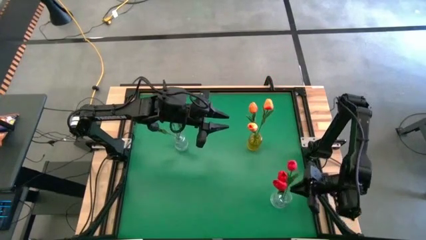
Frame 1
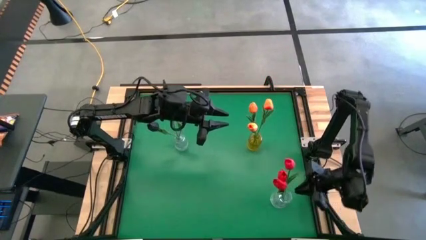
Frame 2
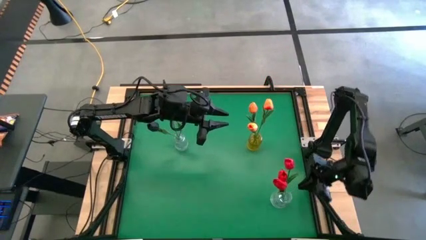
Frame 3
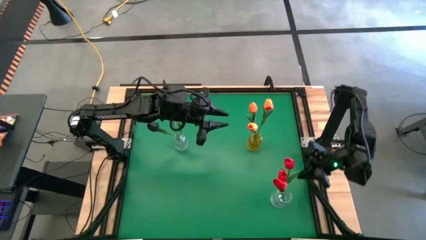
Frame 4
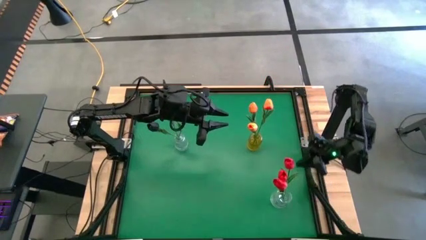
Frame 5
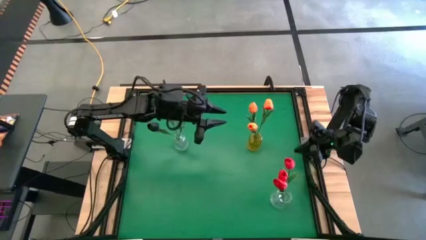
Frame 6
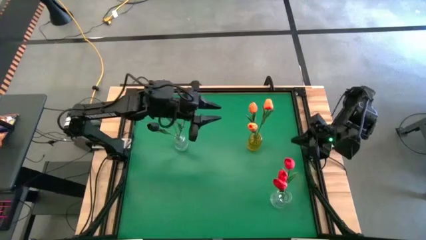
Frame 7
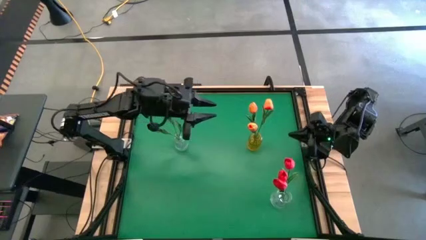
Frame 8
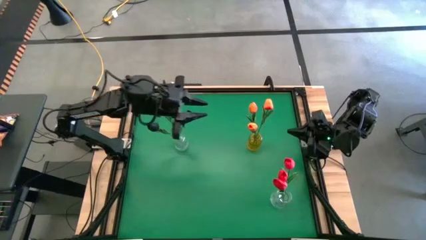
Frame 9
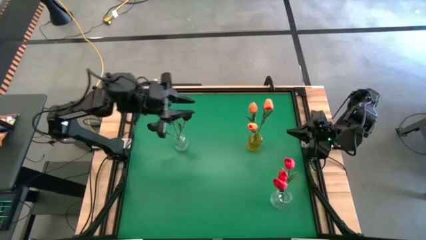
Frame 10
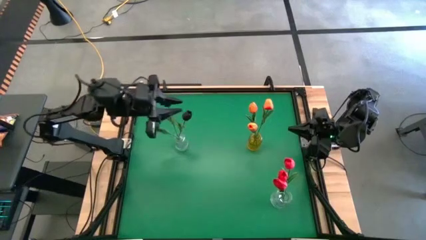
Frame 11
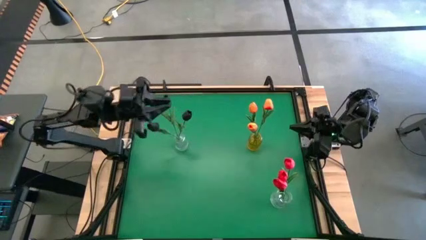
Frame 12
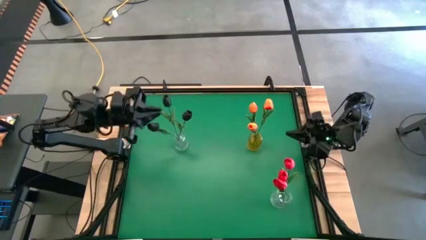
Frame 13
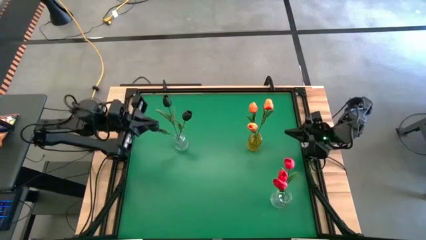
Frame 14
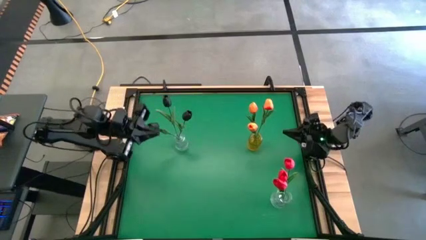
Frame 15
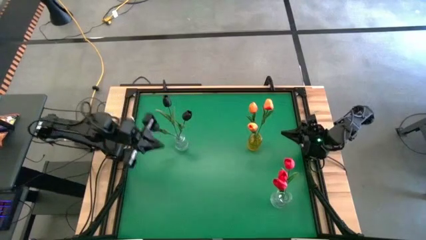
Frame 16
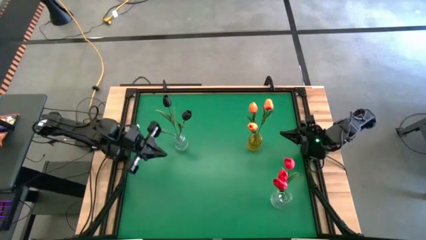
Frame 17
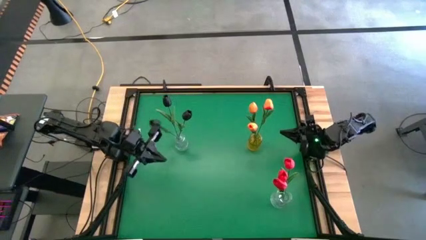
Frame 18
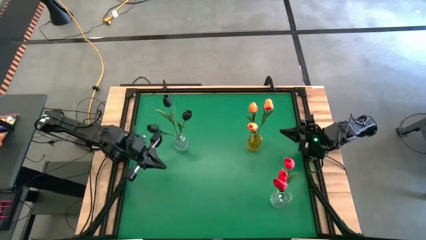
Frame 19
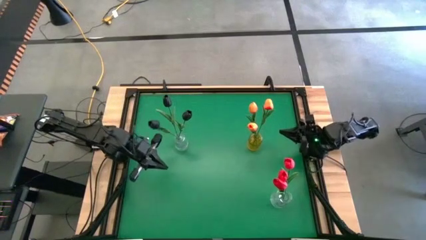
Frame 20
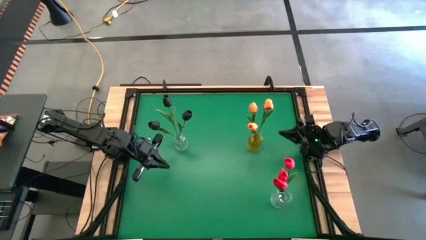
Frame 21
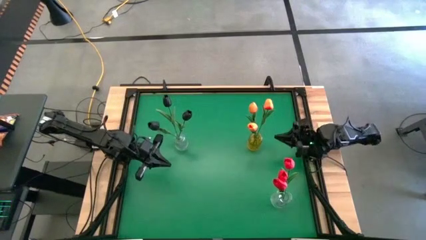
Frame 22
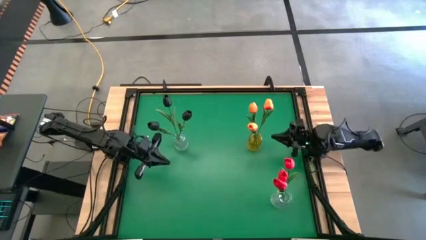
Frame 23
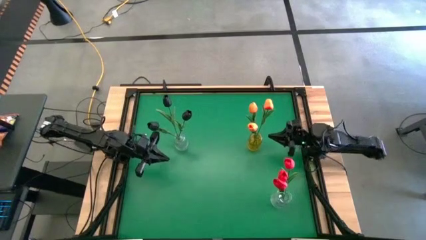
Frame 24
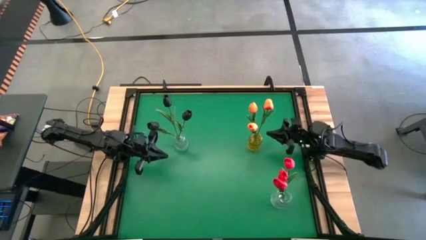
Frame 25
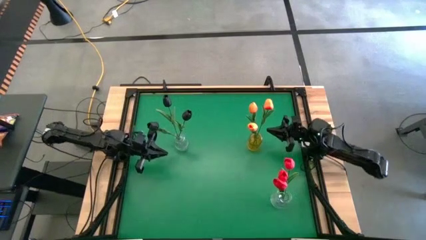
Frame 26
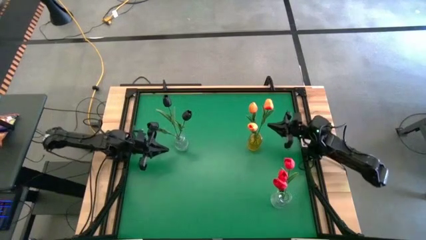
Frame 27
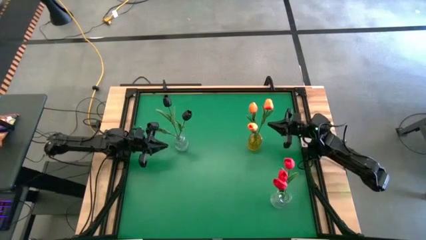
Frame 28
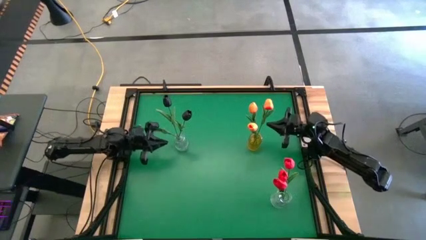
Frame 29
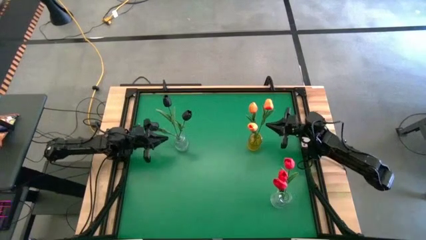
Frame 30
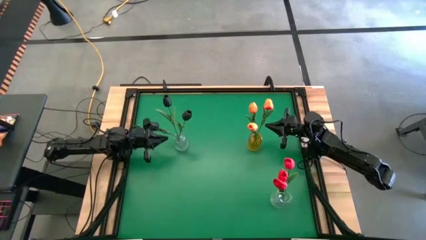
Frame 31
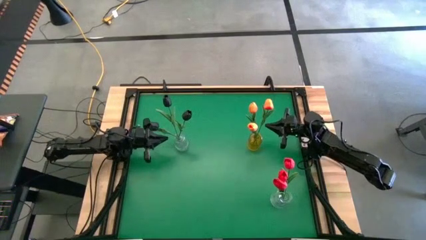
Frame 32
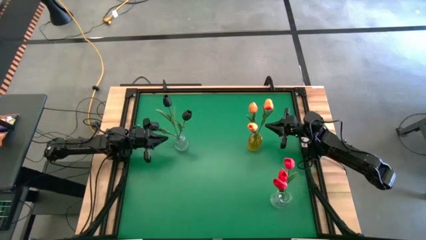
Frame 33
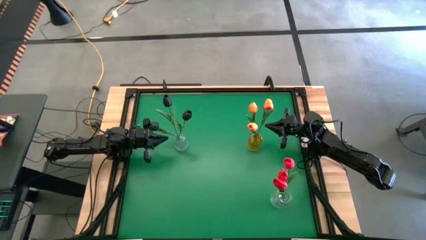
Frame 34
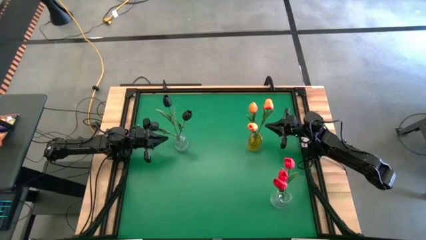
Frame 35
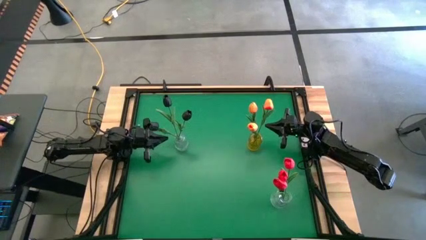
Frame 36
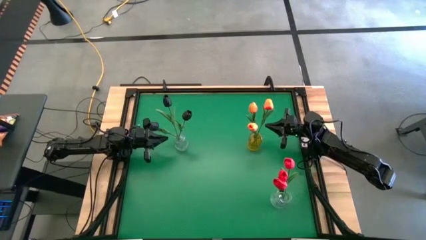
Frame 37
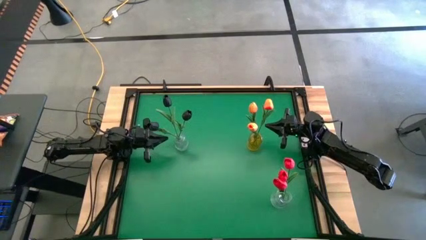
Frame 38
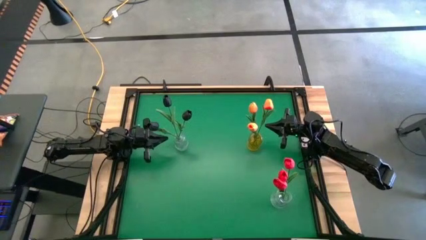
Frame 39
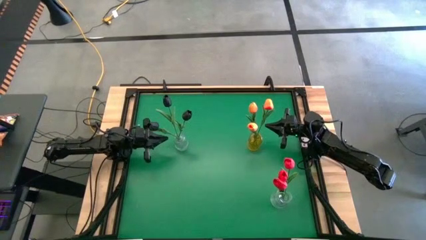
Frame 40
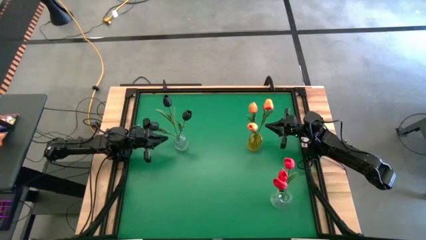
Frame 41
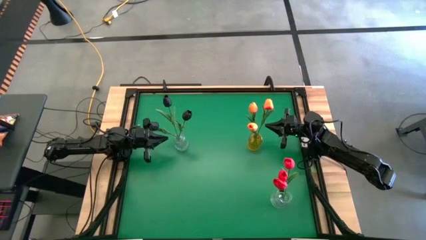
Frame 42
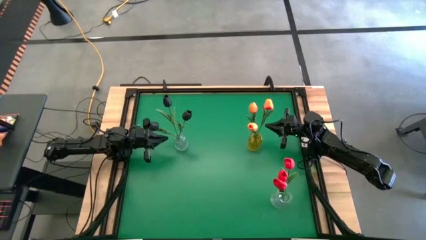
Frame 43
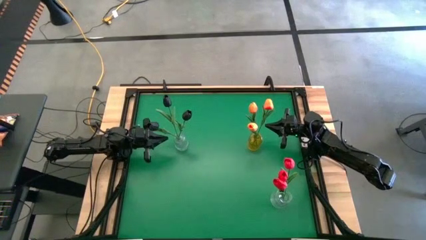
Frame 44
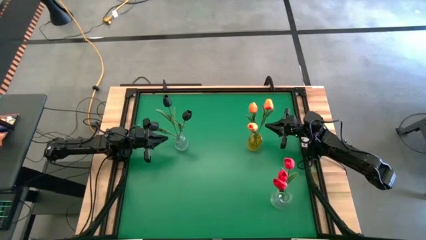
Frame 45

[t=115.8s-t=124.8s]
Task: Sort flowers into vase by color
Return to Home Position

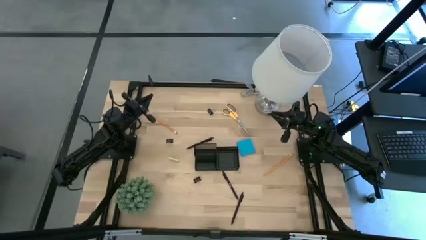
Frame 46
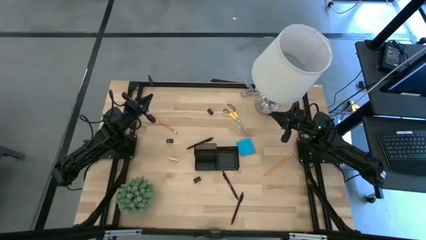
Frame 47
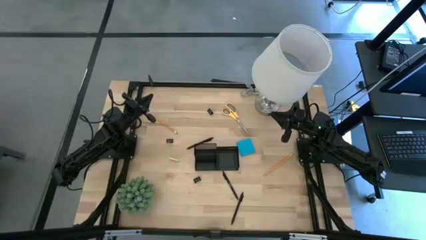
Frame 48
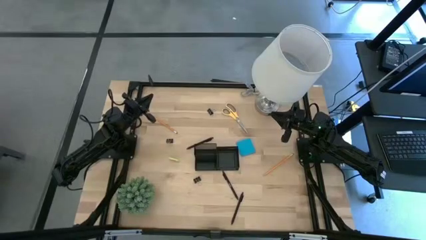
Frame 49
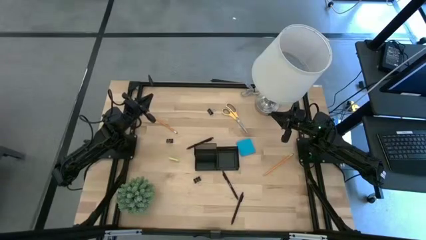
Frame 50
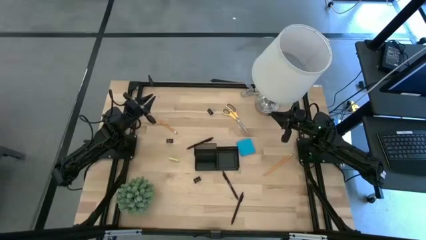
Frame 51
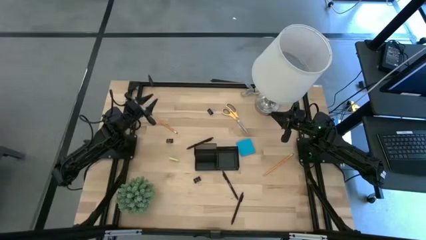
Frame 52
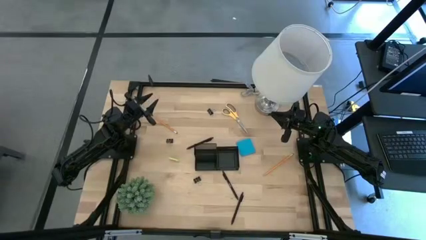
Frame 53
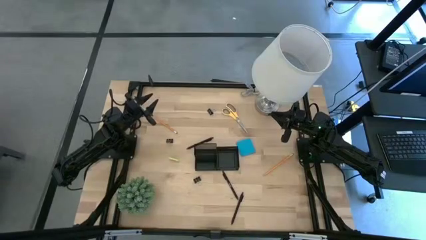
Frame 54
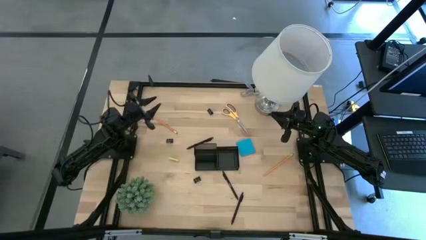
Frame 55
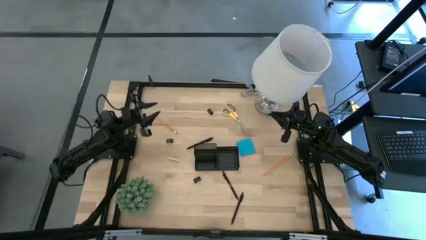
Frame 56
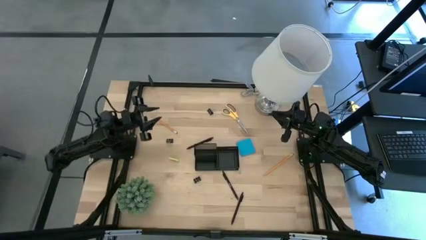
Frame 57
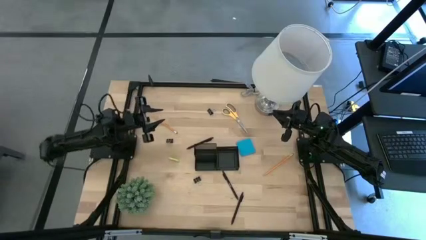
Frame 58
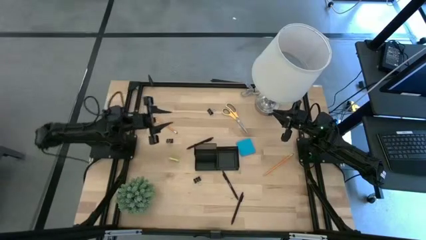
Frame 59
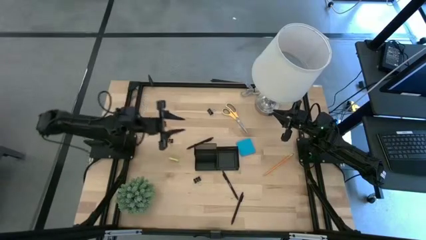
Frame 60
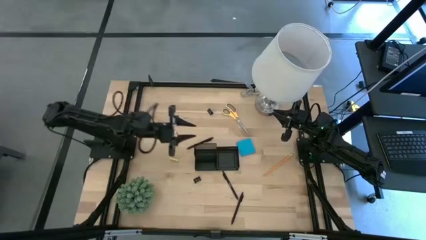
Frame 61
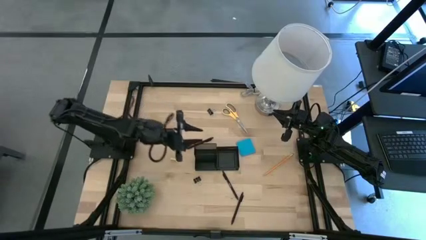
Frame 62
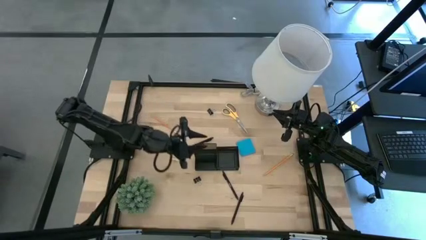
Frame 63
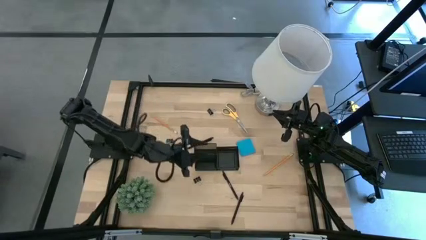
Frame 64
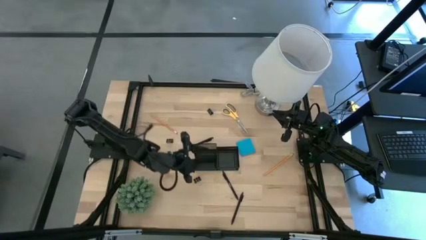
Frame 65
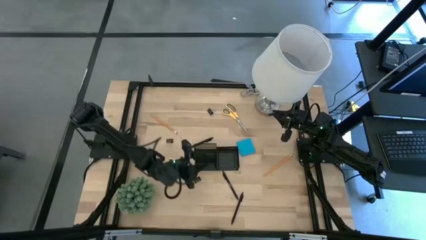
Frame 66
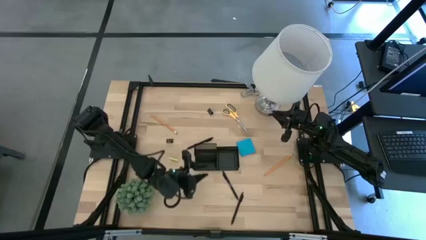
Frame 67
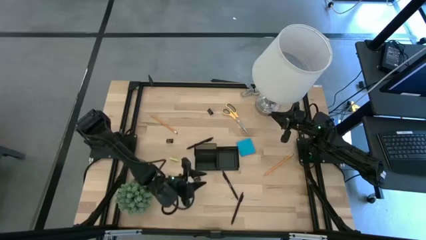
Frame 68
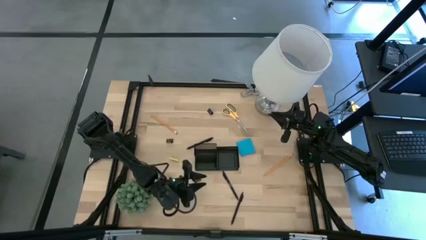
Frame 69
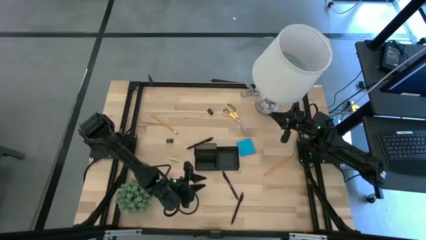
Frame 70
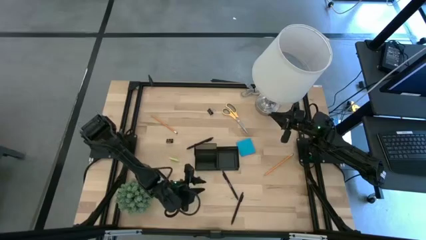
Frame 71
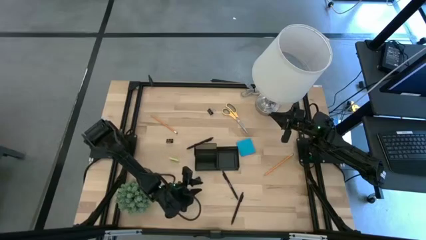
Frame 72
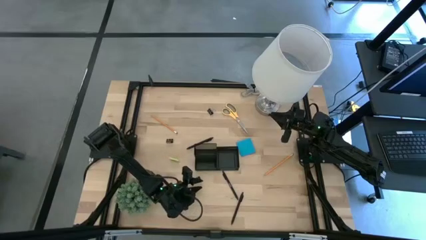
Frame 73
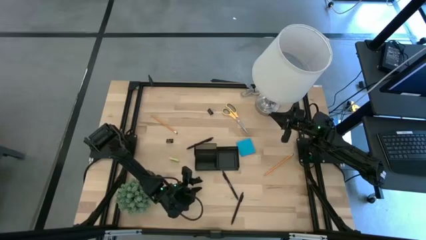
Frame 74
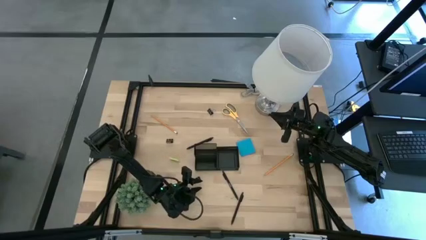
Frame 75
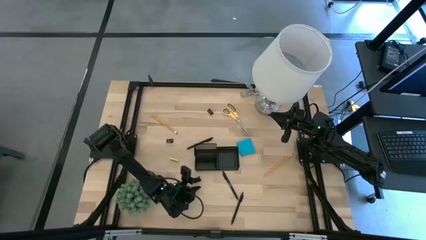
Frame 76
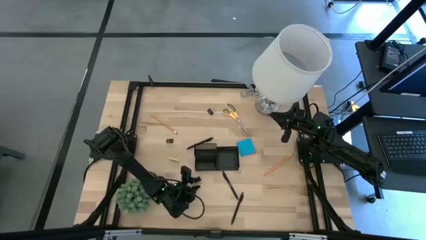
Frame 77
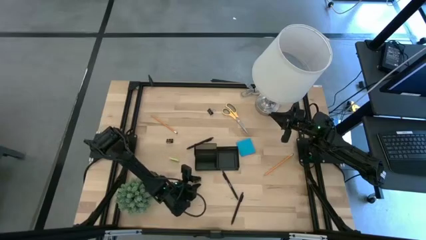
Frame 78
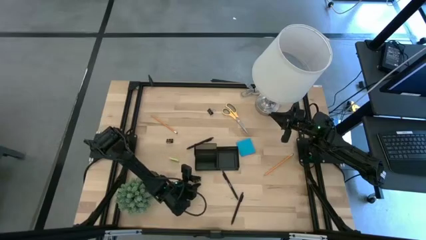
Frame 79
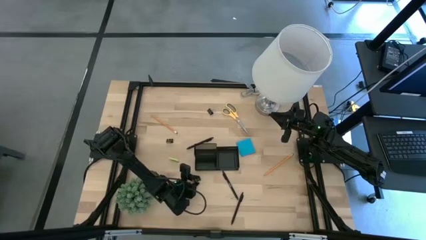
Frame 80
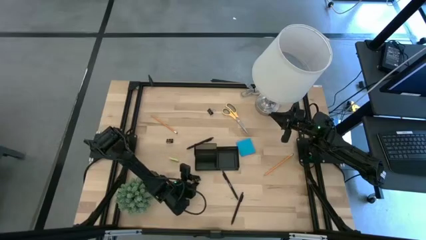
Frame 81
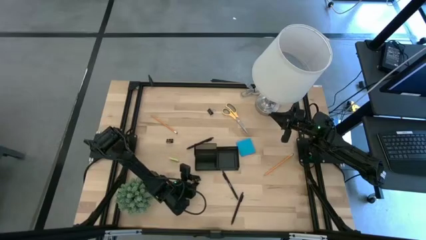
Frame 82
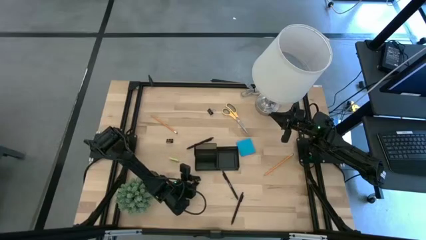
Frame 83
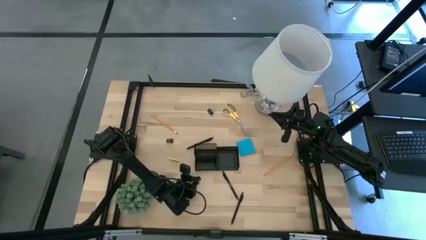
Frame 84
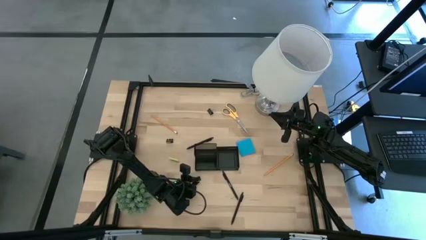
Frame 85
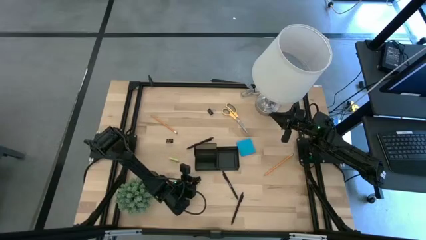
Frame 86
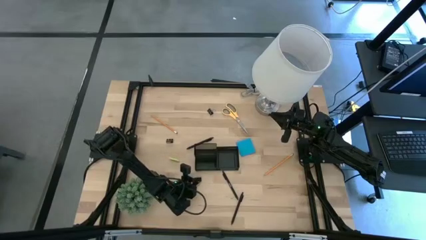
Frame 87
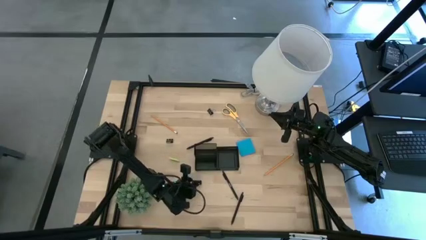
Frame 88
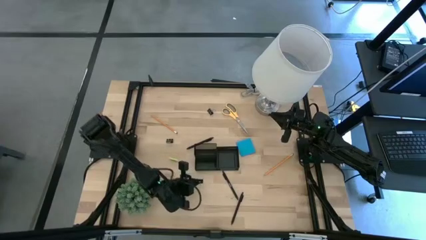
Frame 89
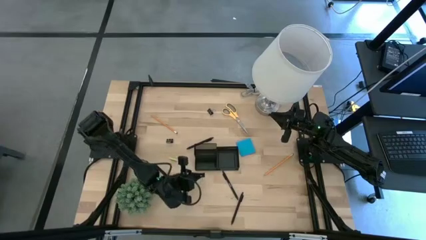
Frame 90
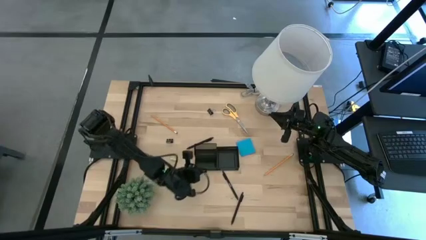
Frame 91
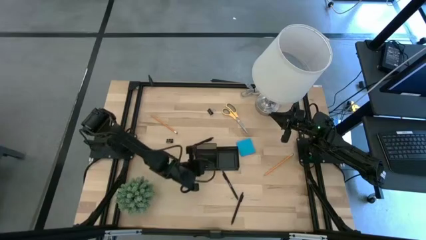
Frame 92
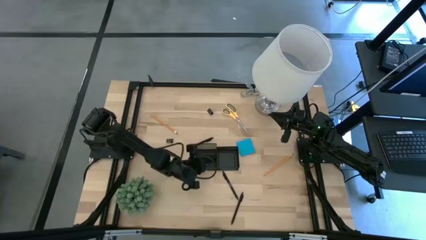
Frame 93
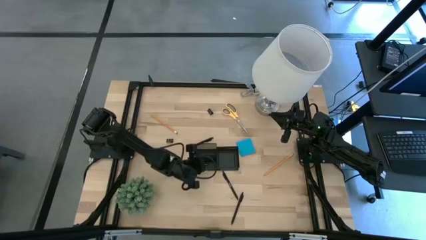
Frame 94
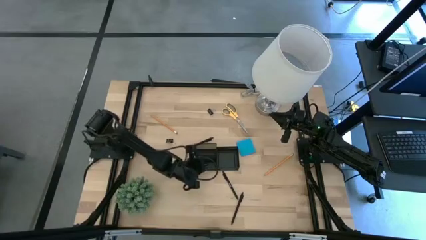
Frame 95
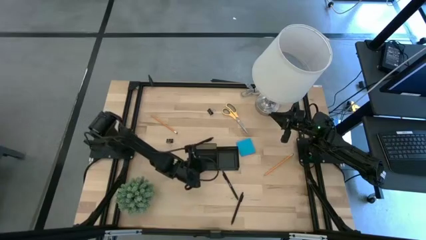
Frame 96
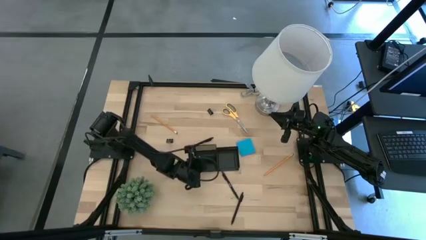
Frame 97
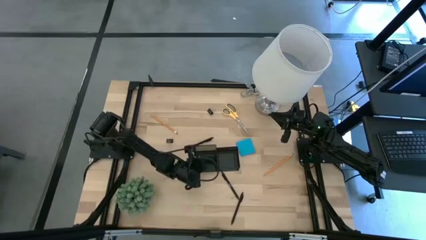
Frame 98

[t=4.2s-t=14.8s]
Task: Pick and place office supplies into organizer
Put the bottom black binder clip into the desk organizer
